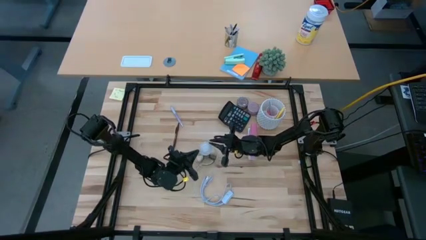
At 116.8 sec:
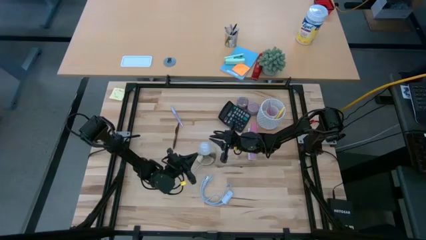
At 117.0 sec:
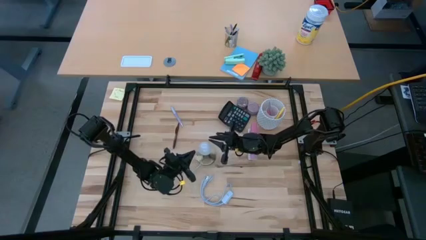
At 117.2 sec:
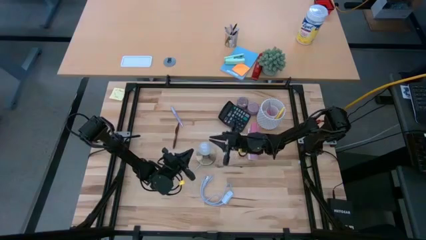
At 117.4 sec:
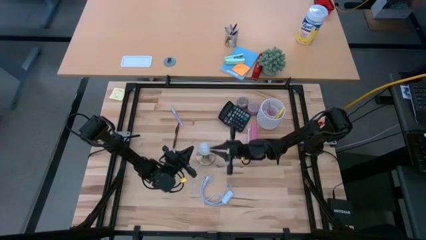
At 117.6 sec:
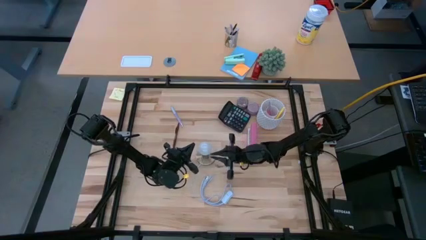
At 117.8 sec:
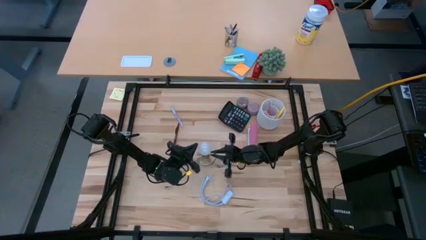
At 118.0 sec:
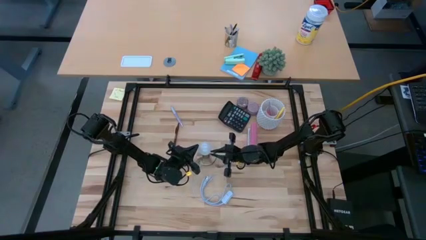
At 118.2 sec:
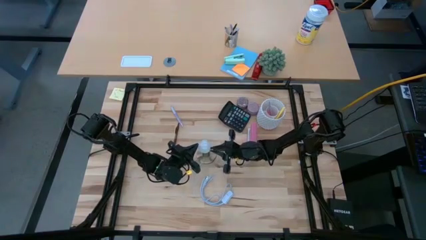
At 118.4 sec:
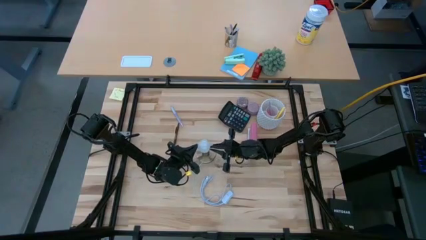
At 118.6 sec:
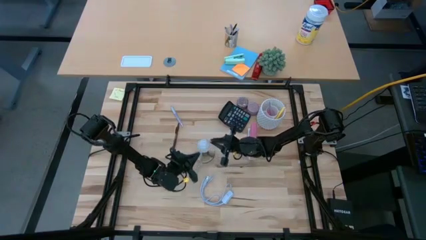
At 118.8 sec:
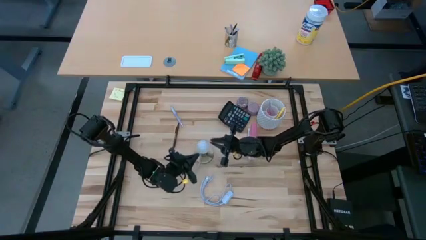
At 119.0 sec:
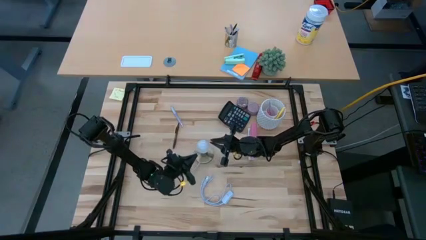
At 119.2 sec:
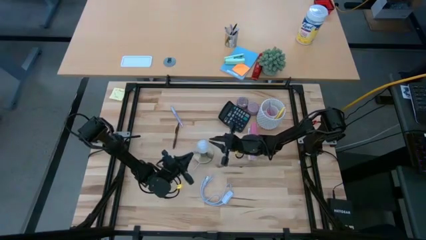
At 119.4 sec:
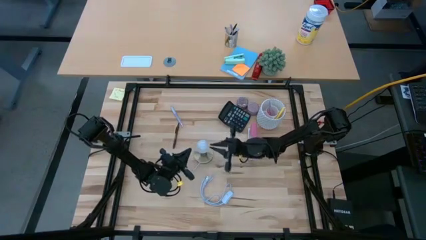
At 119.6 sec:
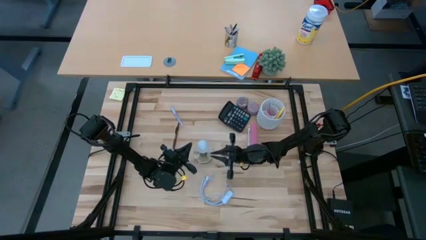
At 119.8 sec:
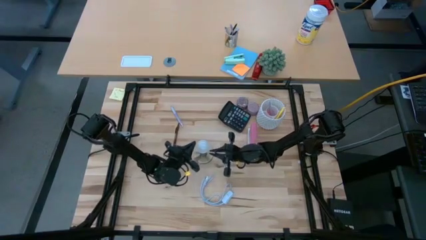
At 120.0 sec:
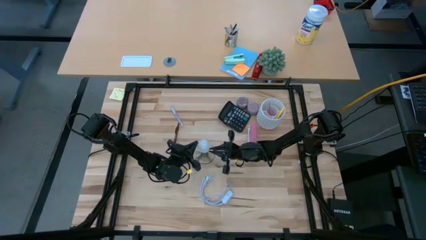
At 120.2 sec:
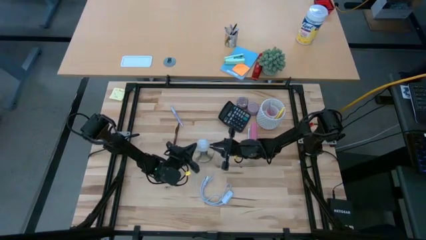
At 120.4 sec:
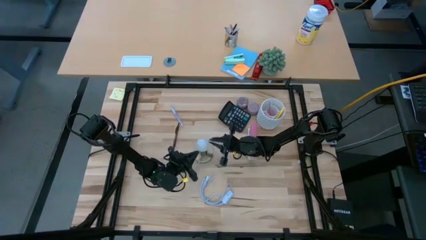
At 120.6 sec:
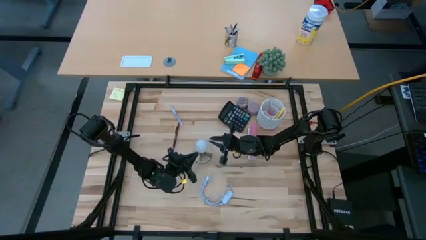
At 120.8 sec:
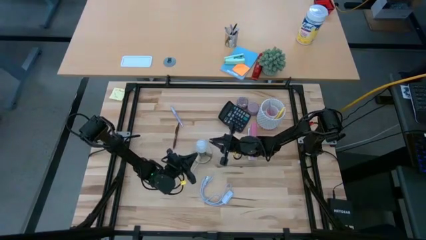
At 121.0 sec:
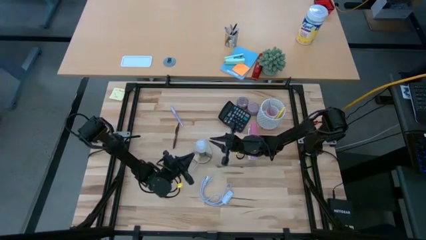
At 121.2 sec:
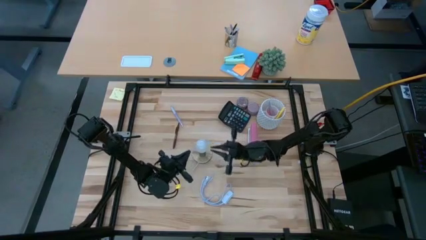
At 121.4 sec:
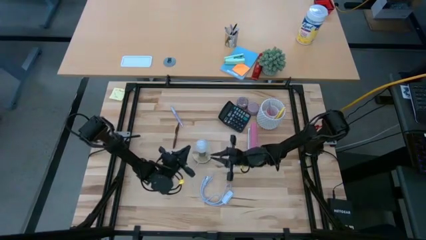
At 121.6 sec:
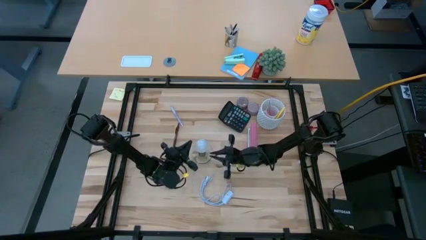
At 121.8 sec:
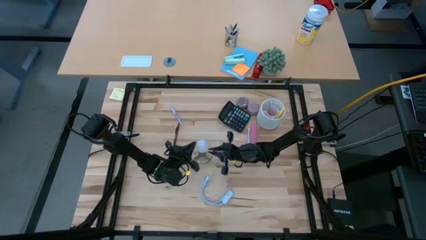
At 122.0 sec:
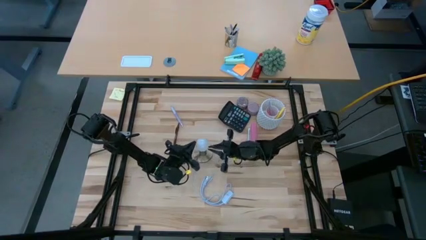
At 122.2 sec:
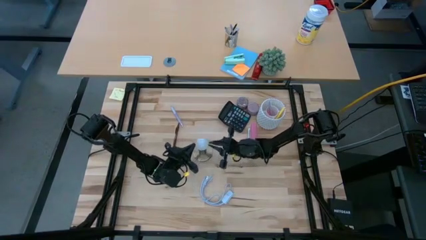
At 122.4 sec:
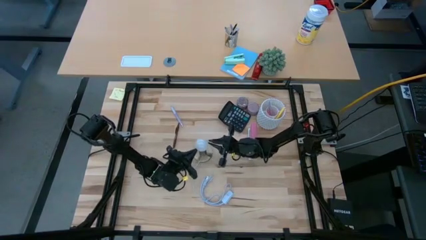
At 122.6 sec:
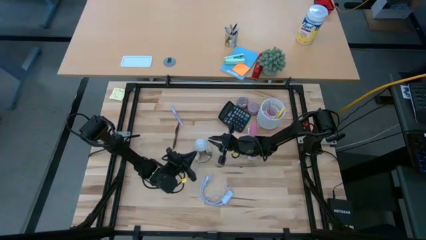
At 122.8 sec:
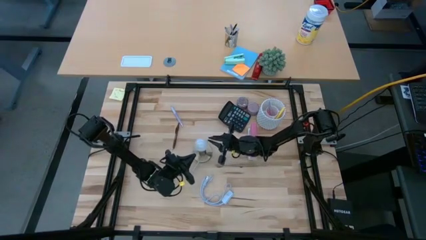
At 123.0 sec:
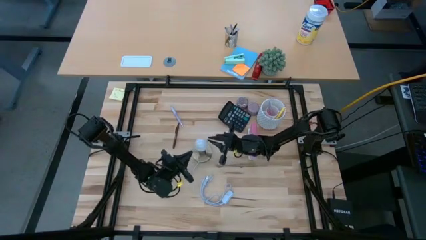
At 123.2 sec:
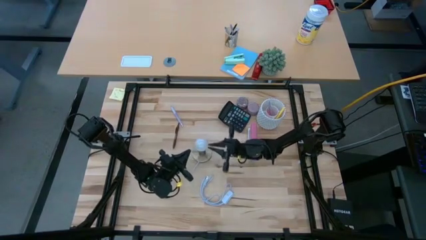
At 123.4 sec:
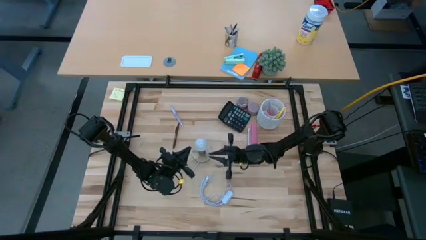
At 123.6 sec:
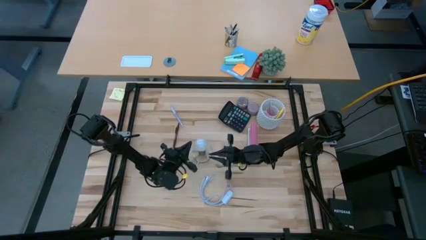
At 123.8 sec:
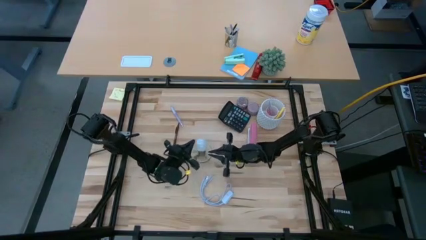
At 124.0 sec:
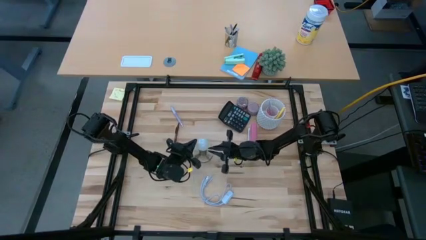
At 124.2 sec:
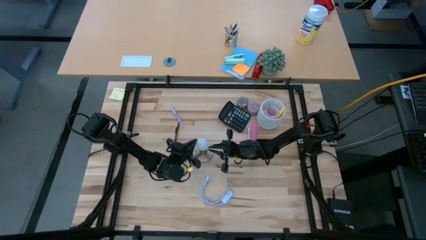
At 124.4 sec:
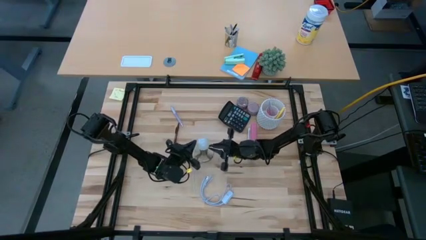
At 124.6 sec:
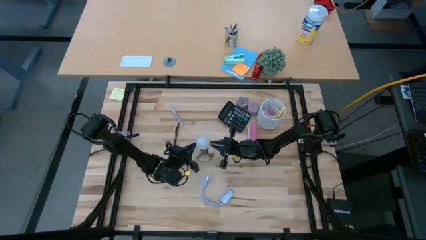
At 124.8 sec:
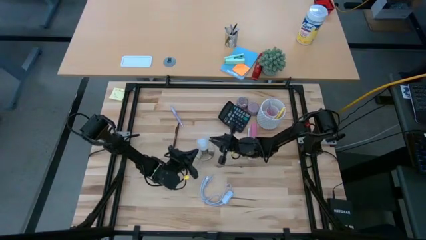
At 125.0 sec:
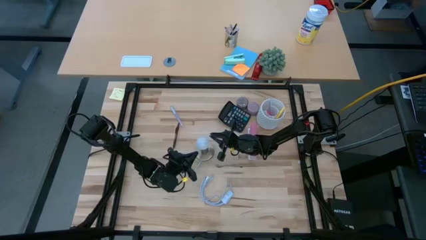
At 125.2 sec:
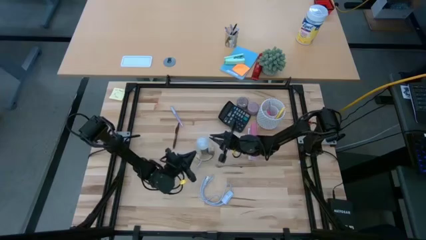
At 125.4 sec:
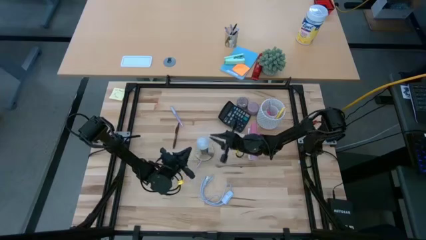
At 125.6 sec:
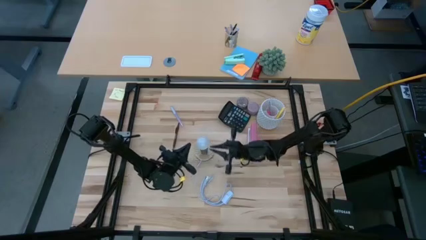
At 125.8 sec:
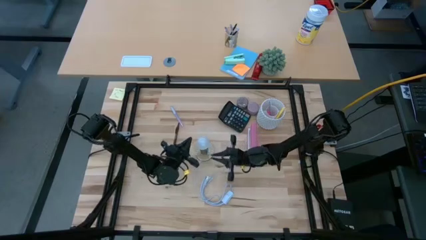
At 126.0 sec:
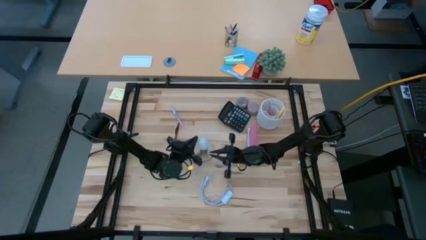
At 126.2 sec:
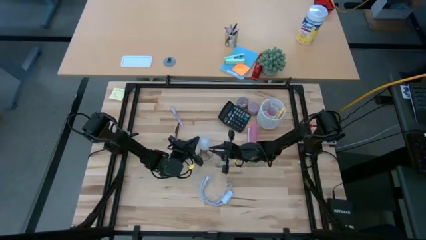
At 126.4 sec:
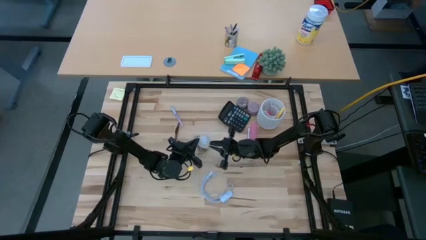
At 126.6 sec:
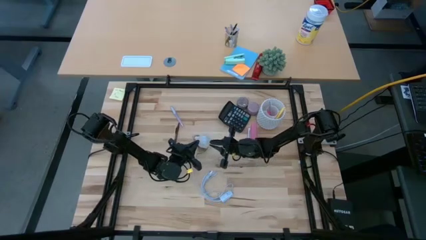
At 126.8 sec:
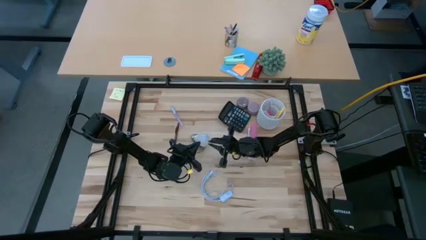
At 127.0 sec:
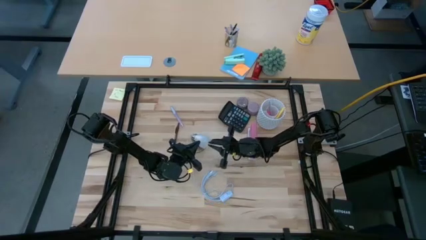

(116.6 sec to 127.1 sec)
Task: Screw lightbulb
Remove the lightbulb from the gold lamp

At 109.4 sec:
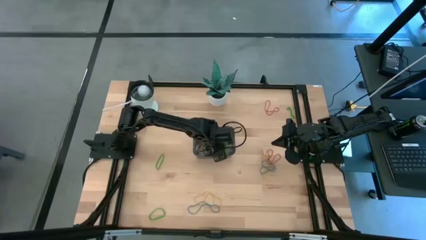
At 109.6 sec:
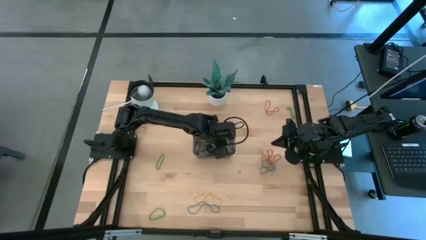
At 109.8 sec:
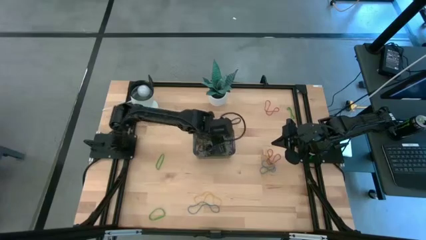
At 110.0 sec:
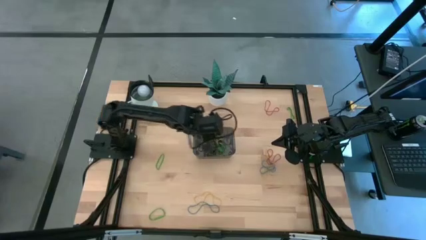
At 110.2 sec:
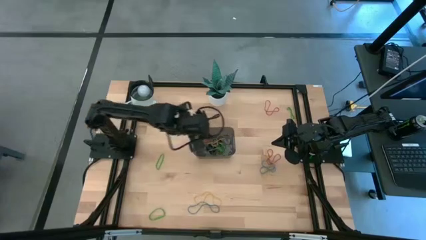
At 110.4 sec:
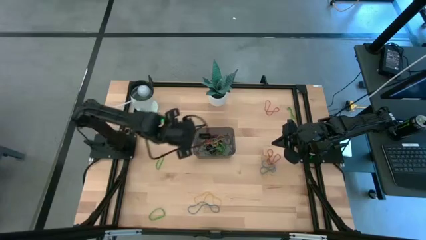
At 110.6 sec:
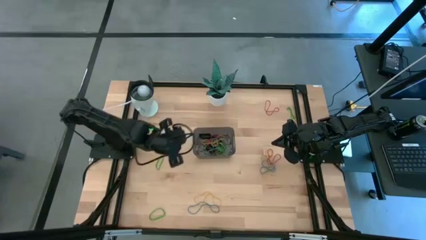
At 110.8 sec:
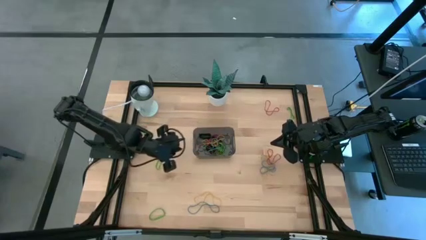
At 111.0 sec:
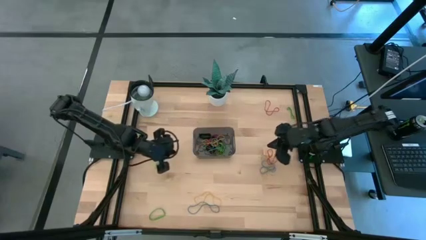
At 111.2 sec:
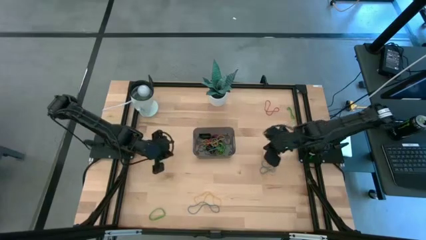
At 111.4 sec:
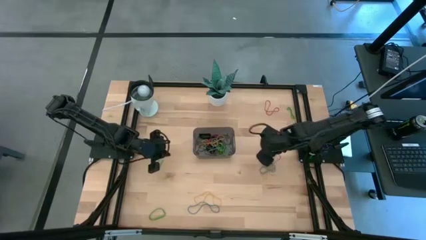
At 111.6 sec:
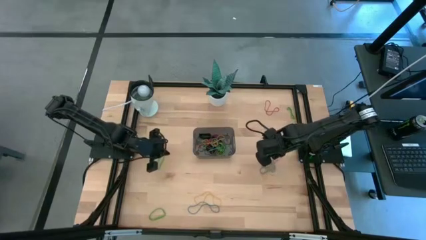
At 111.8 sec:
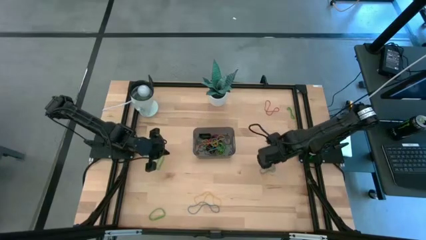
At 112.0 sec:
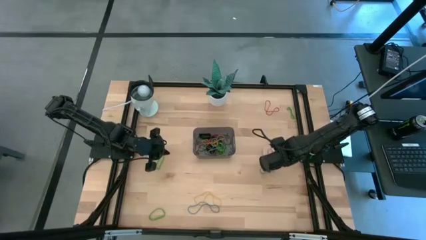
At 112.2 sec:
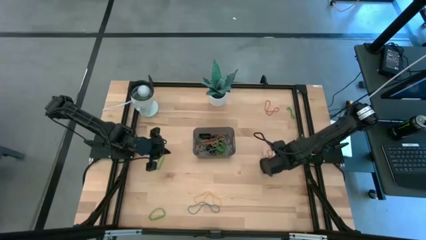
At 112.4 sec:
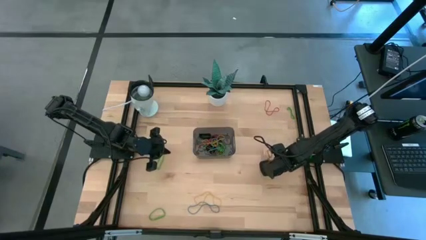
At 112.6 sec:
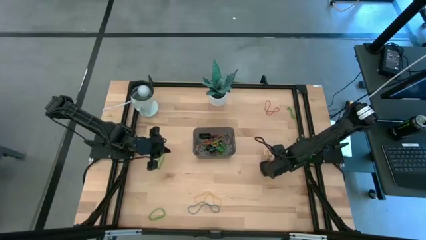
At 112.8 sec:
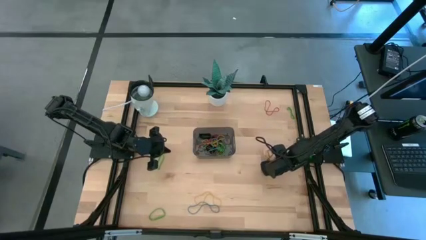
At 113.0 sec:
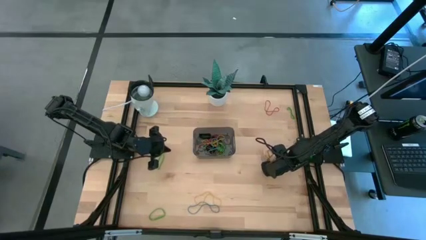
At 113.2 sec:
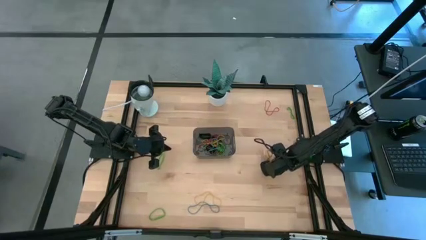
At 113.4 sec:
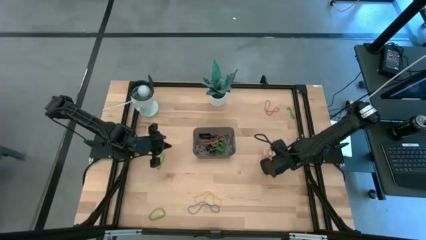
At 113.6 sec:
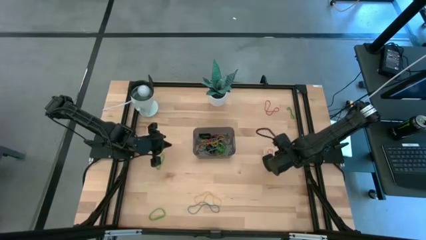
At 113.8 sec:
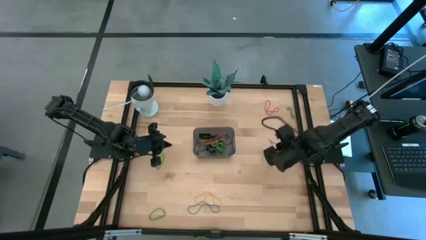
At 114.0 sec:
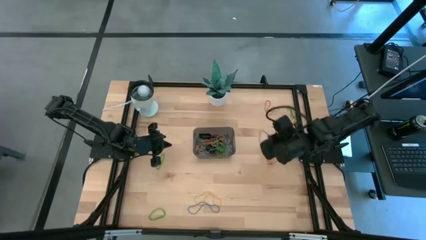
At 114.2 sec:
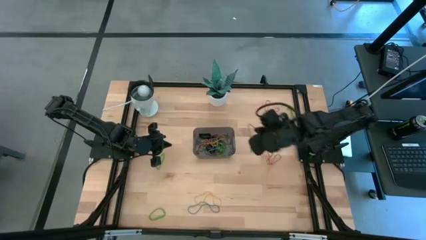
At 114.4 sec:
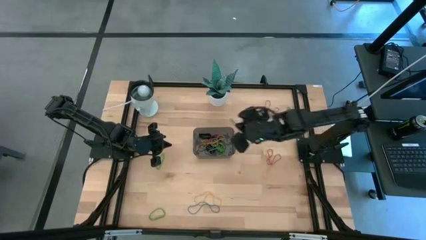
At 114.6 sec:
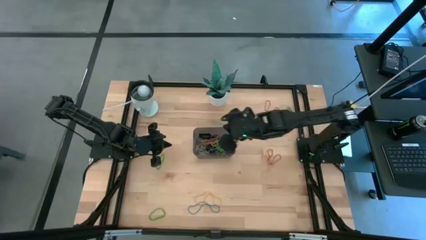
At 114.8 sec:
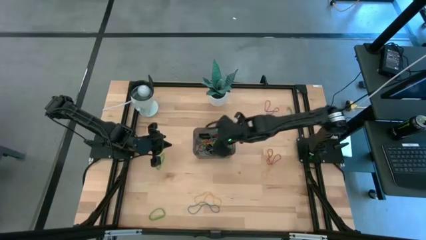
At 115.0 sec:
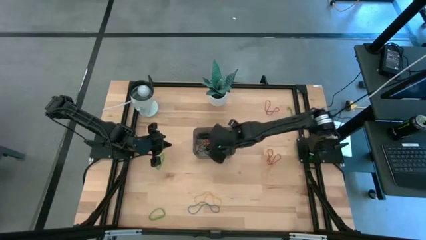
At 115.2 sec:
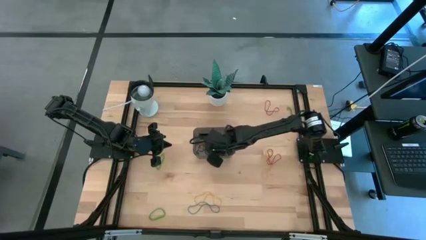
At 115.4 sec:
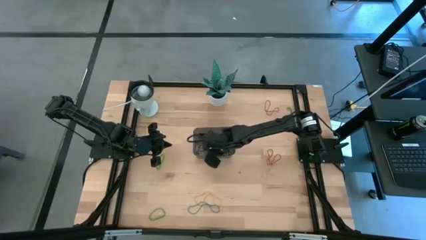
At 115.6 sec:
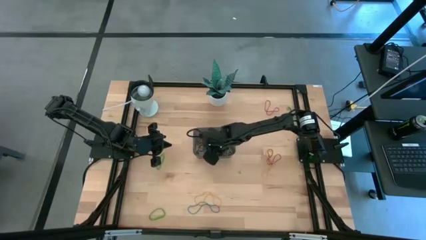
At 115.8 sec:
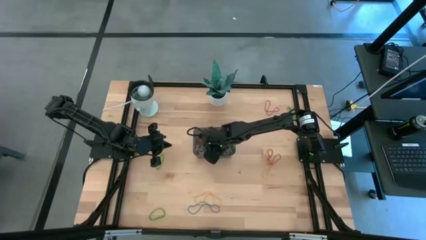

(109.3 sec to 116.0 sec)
Task: Pick and place rubber bands into bin
Put the blue rubber band into the black bin
